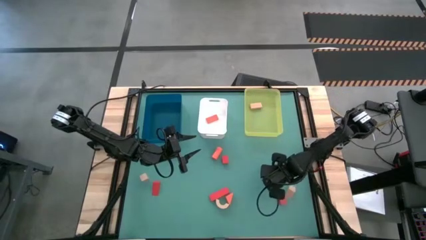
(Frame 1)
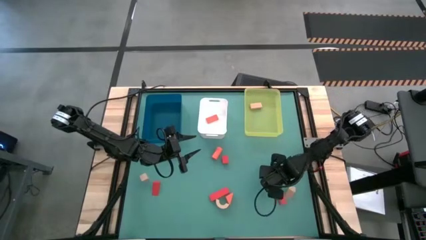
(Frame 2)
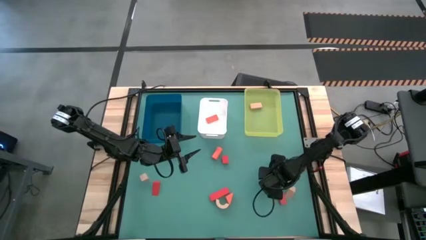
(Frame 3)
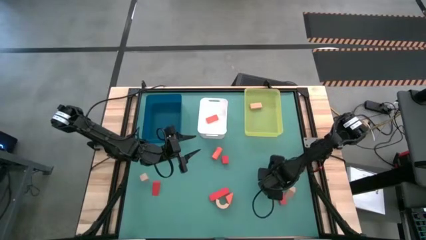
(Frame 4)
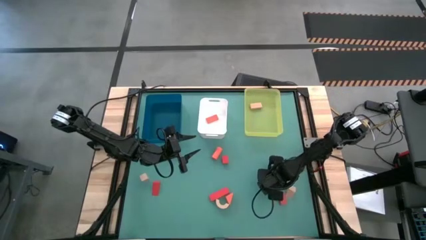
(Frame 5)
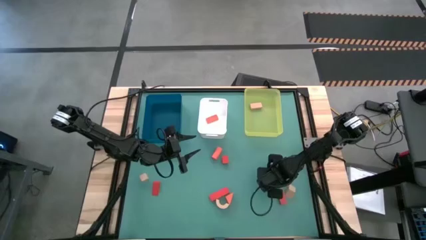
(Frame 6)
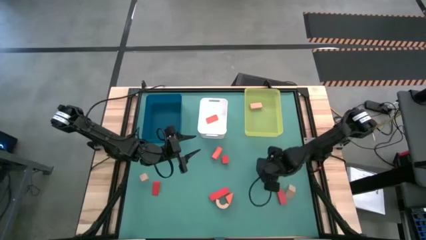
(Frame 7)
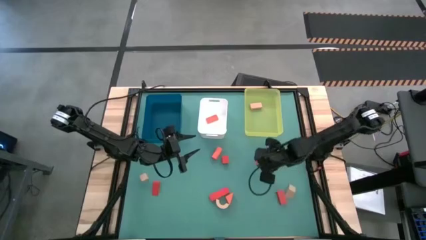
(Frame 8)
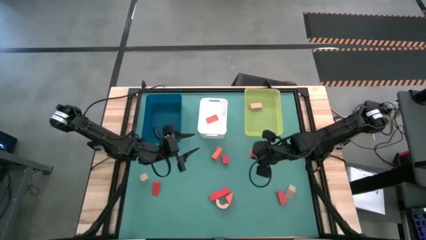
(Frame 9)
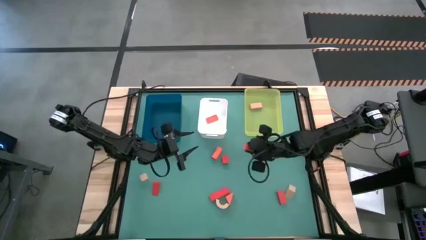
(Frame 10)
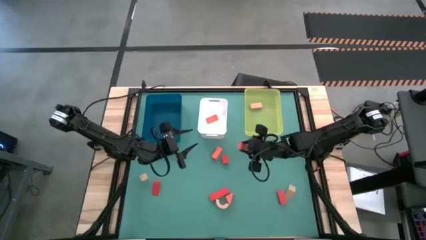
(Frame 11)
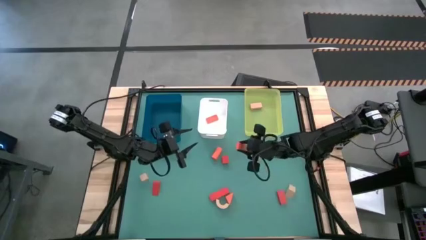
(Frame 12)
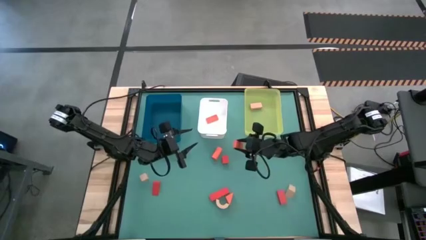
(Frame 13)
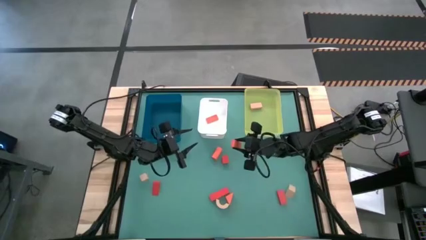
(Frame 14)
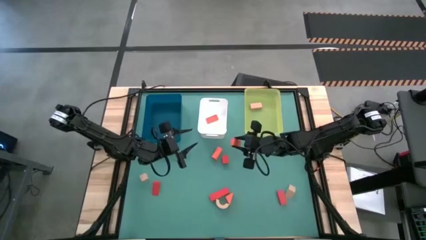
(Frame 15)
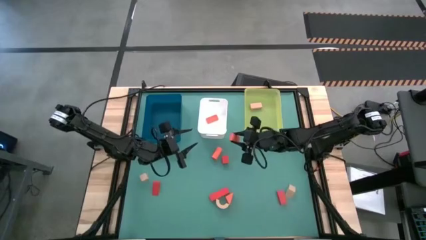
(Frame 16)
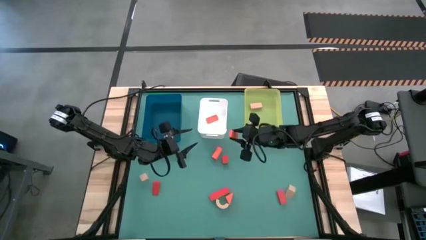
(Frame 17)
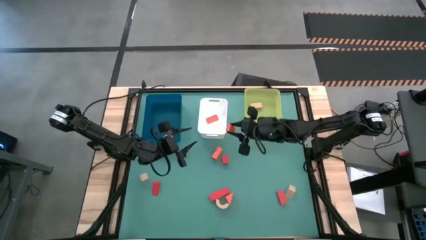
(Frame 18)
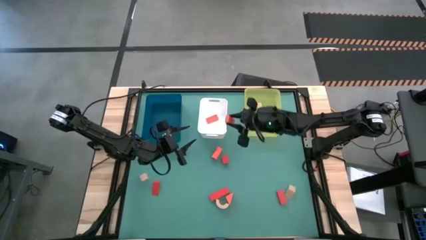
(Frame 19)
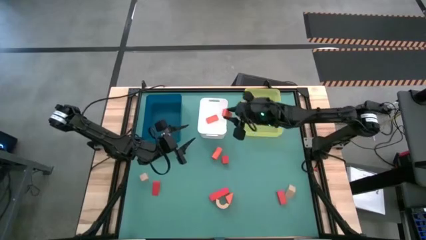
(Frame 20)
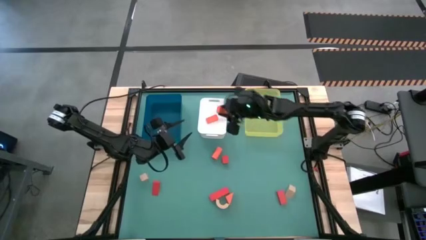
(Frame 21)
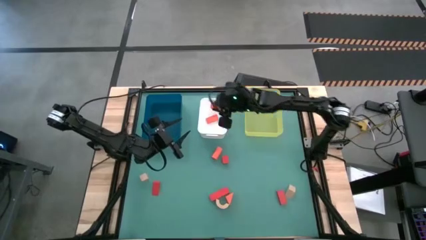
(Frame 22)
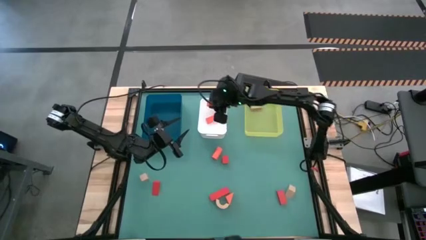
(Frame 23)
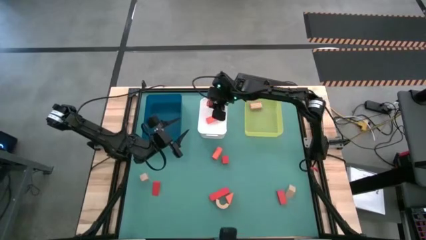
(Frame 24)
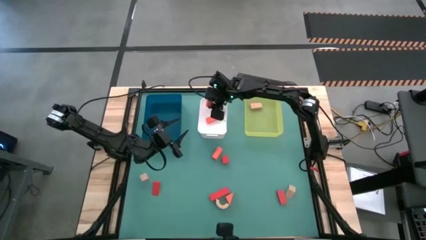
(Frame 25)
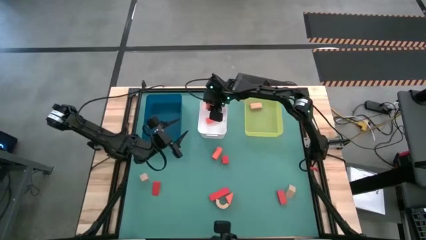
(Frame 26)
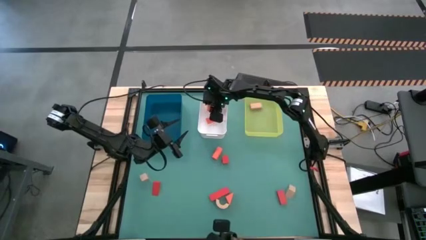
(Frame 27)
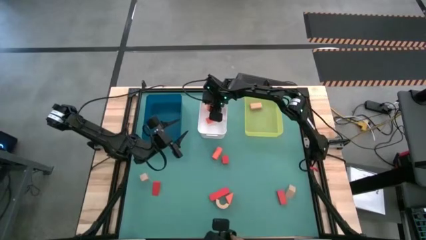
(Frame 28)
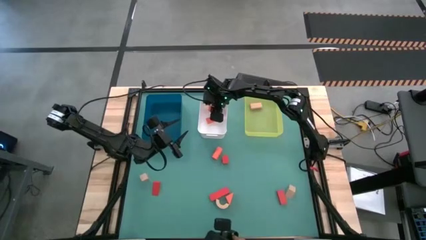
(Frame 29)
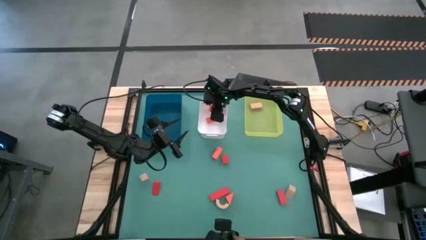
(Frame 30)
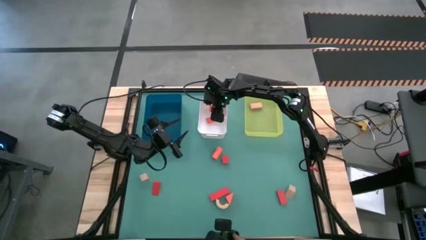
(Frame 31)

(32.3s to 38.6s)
Task: Sort & place blocks by color
Put the bottom right orange block into the white bin

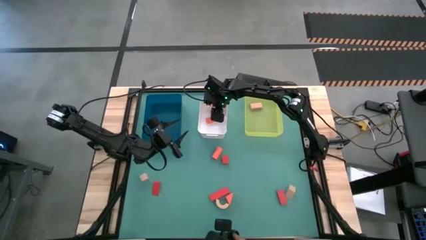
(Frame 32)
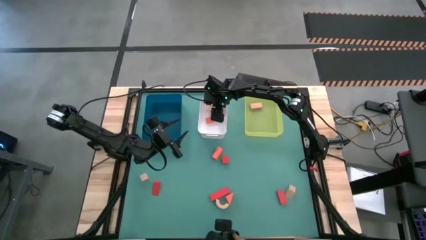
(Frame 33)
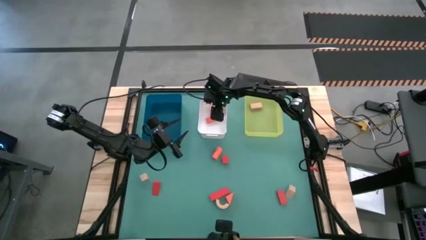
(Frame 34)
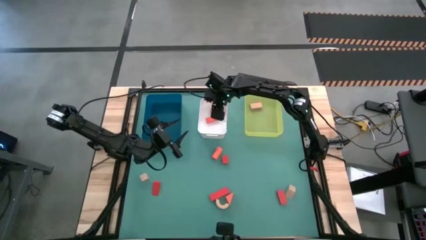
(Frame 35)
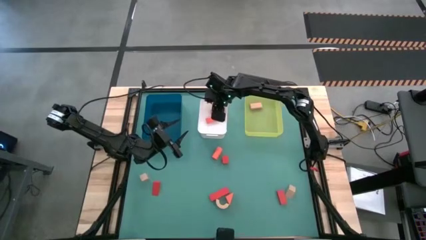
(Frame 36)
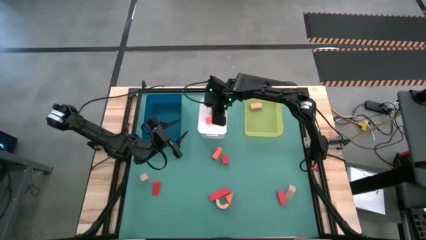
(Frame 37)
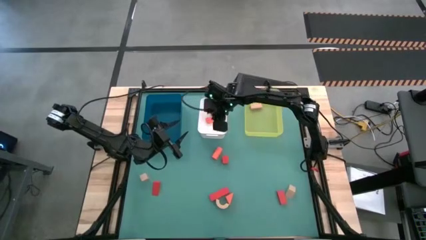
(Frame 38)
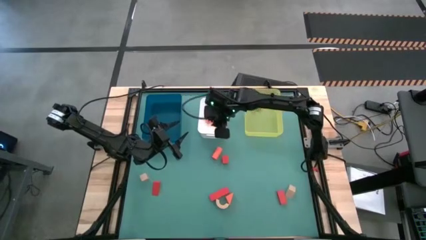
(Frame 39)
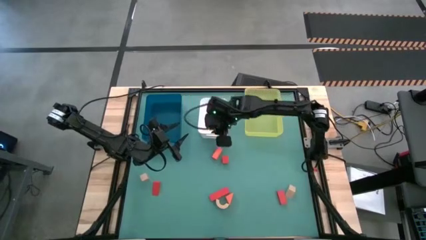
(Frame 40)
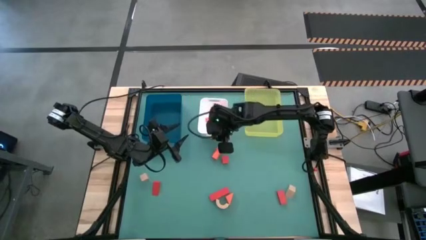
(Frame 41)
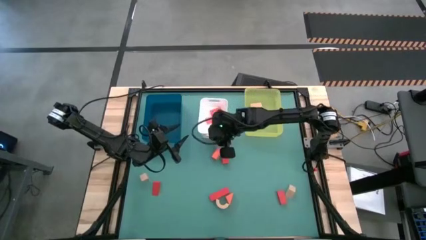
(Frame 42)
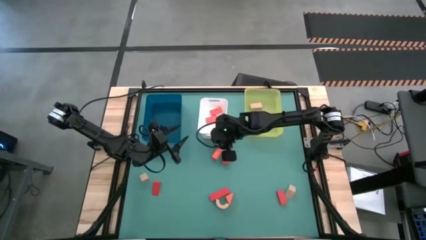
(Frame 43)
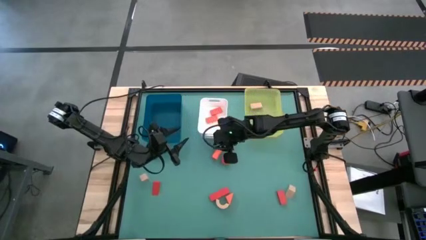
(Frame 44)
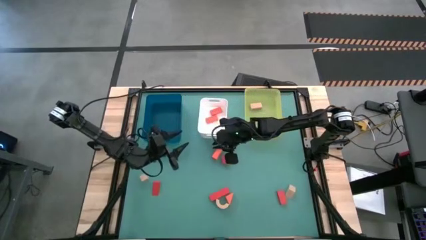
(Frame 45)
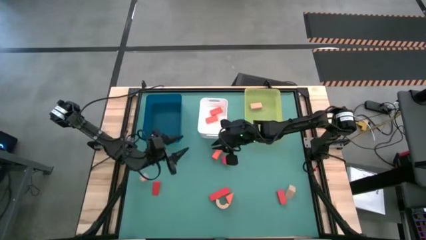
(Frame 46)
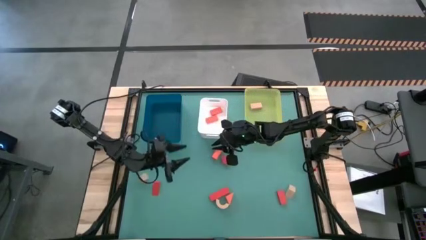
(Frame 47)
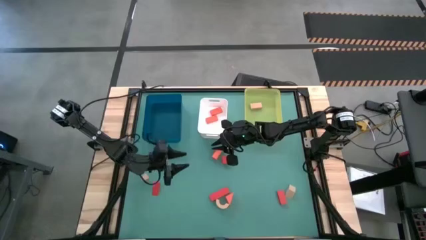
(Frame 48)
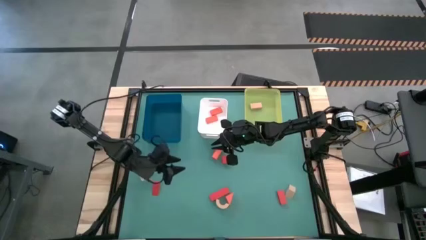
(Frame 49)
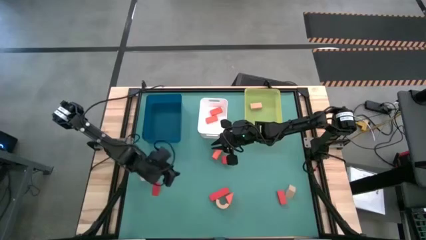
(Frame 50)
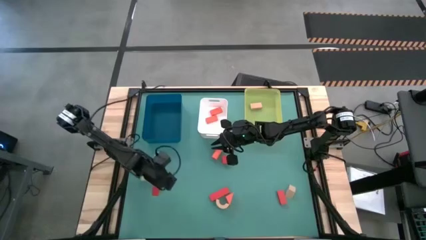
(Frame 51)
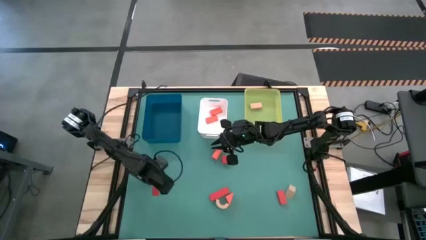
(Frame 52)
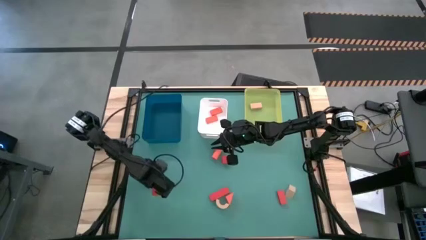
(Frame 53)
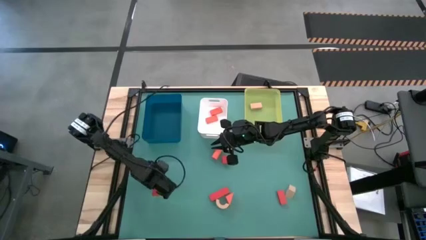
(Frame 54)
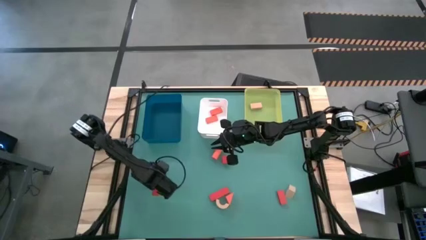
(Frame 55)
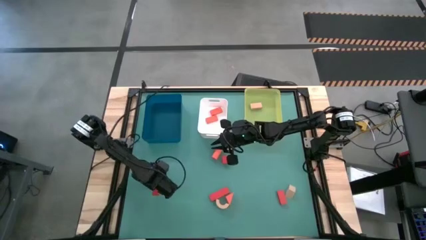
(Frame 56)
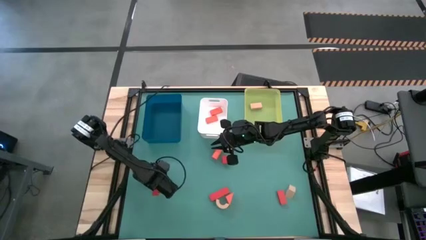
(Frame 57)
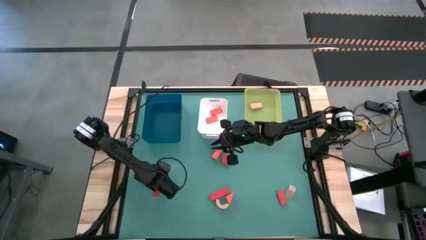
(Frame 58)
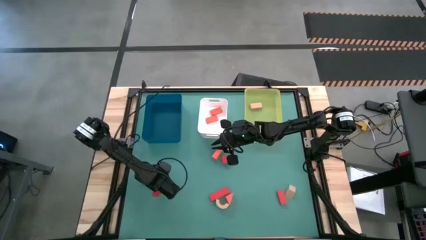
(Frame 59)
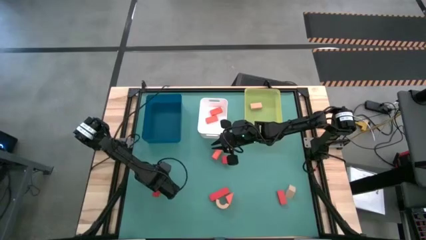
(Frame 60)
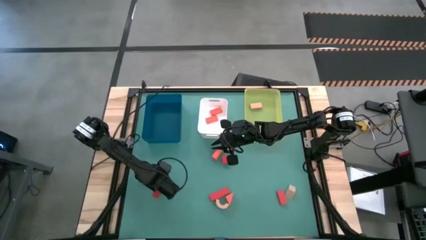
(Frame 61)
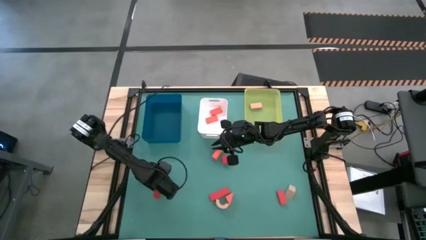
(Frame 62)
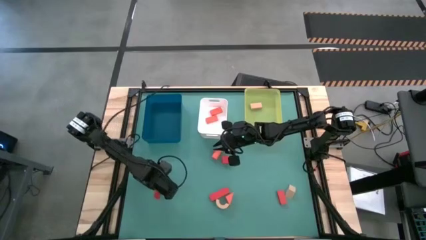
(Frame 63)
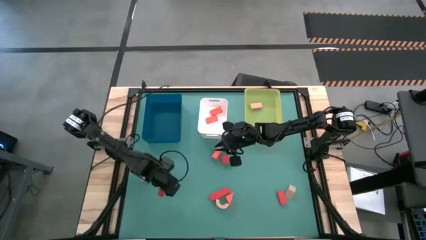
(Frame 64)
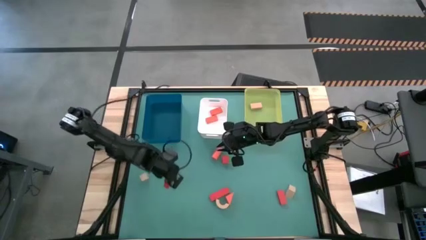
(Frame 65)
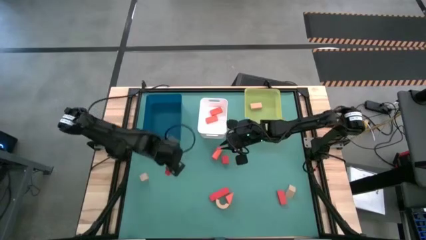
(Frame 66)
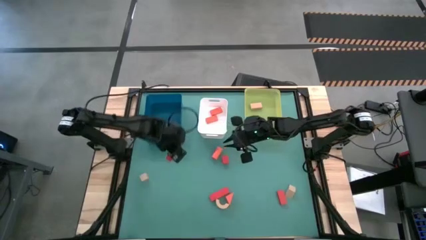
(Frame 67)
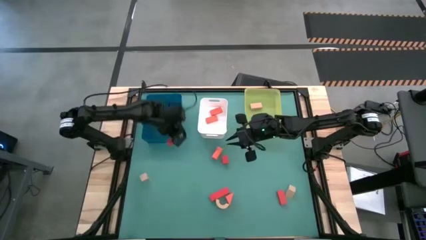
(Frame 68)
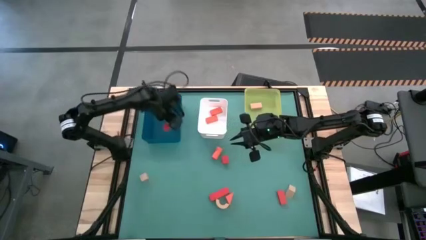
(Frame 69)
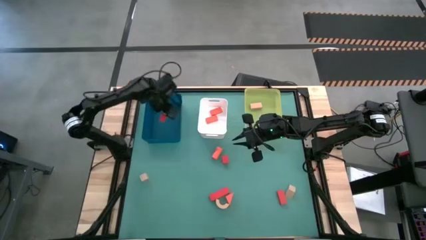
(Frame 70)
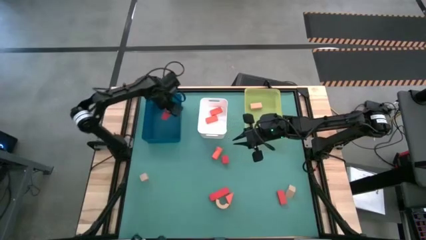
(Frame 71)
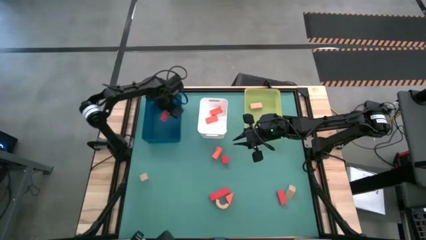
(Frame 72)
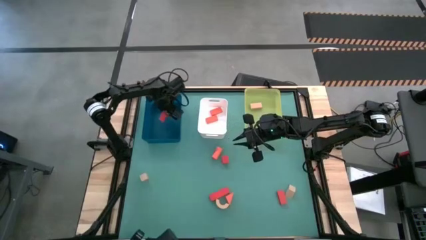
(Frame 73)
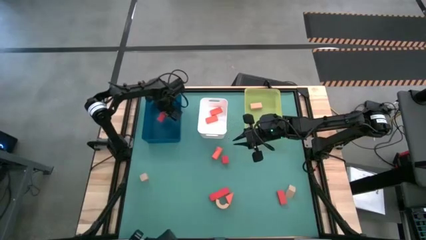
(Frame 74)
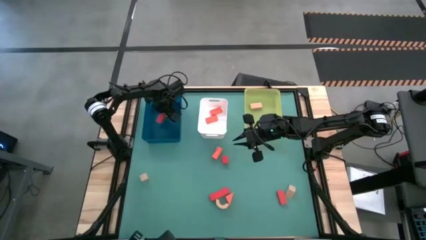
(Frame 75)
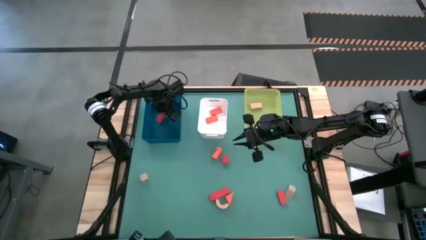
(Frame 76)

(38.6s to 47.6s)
Put the bottom left red block into the blue bin
